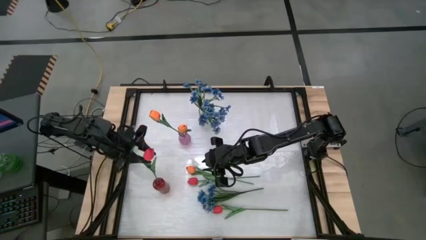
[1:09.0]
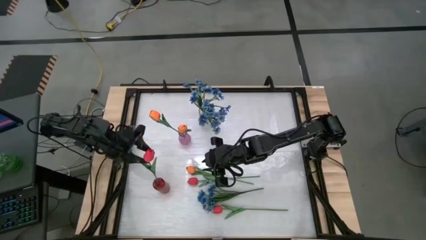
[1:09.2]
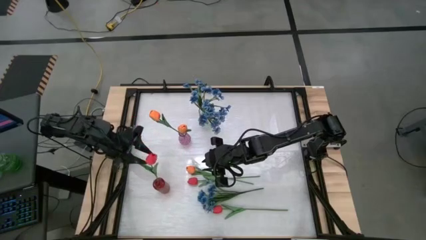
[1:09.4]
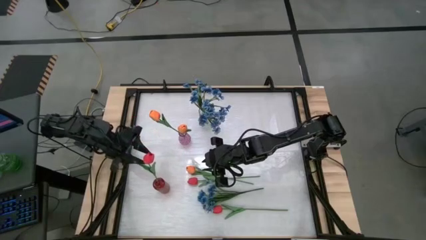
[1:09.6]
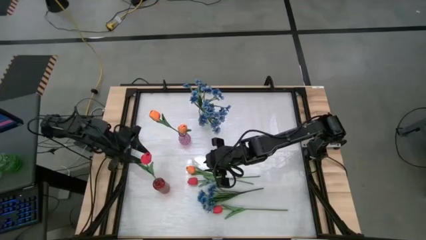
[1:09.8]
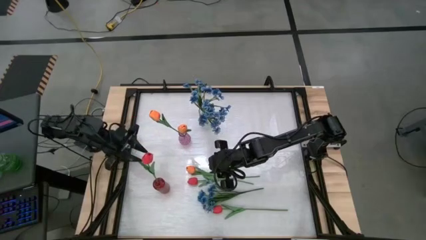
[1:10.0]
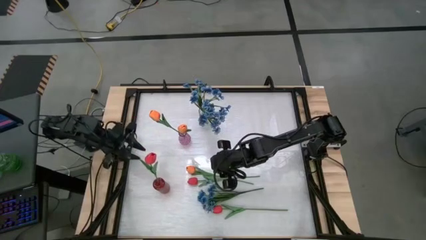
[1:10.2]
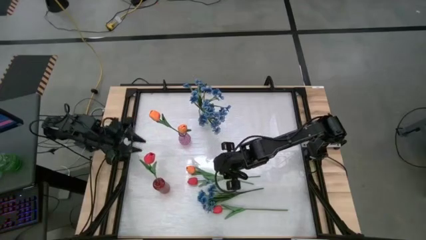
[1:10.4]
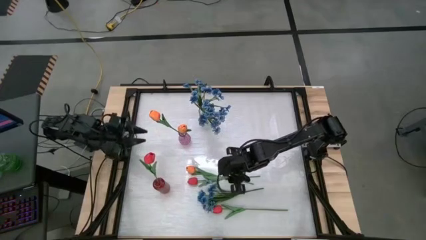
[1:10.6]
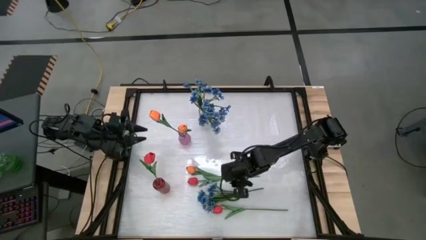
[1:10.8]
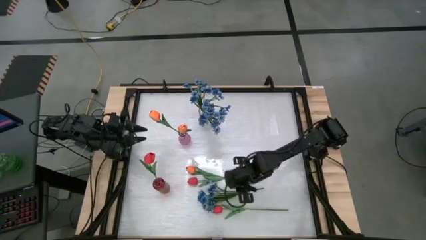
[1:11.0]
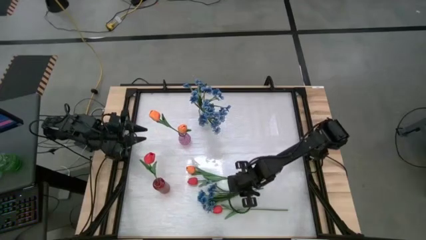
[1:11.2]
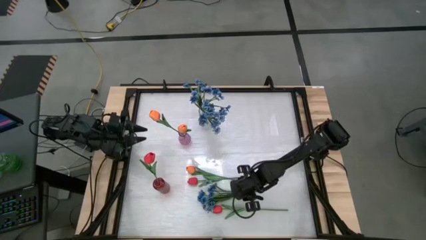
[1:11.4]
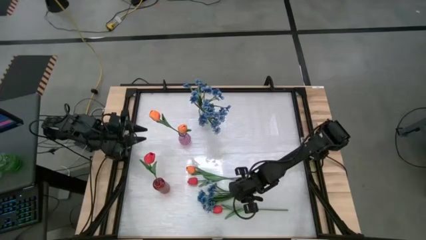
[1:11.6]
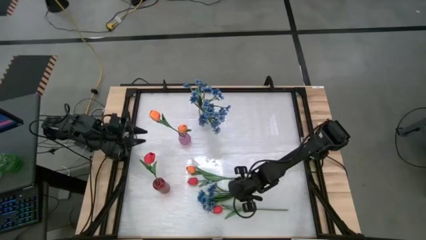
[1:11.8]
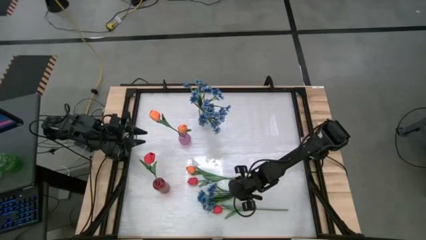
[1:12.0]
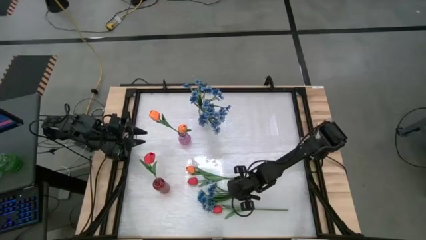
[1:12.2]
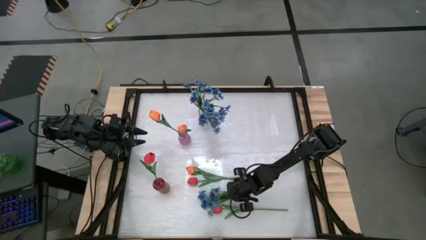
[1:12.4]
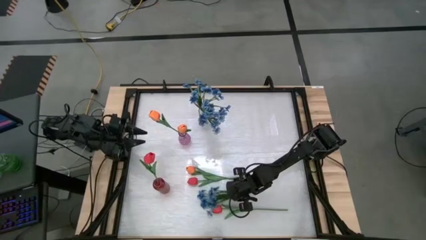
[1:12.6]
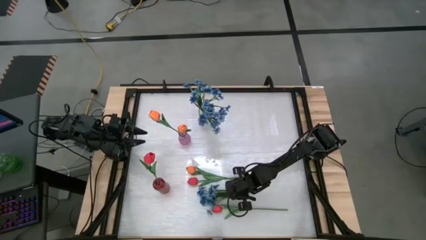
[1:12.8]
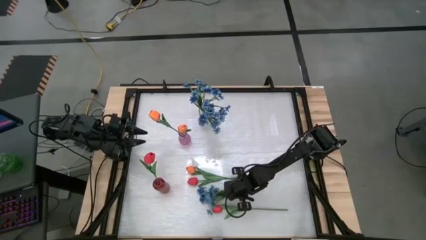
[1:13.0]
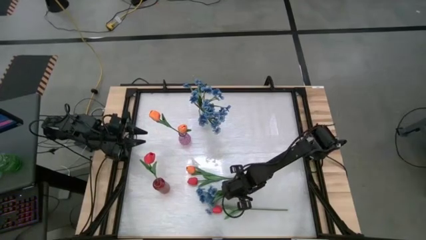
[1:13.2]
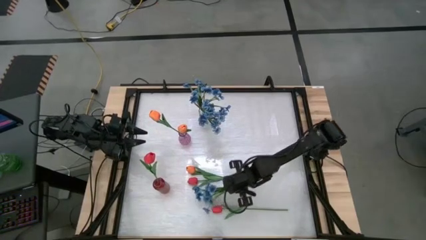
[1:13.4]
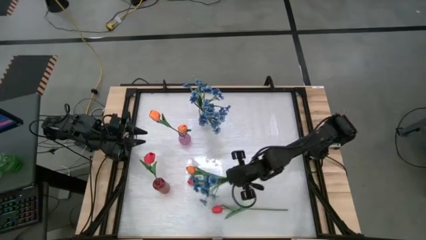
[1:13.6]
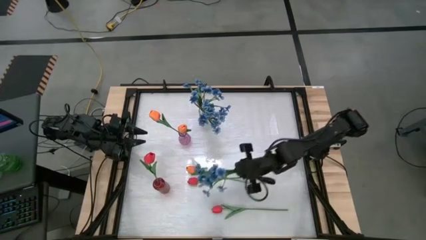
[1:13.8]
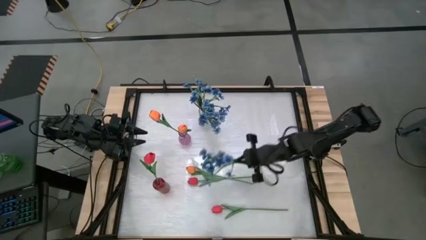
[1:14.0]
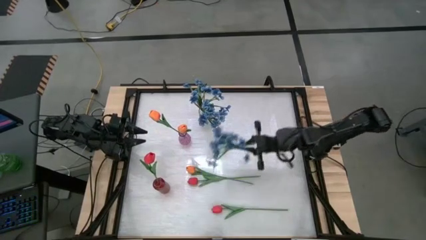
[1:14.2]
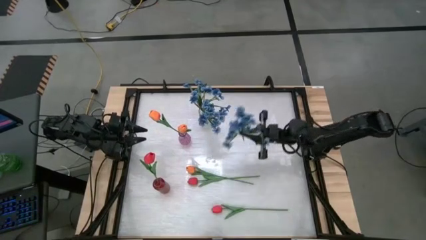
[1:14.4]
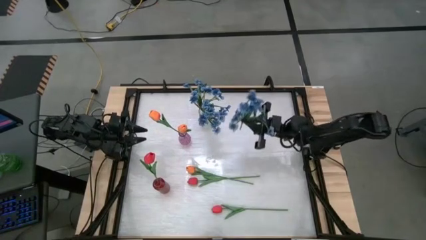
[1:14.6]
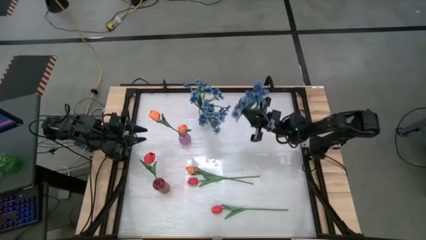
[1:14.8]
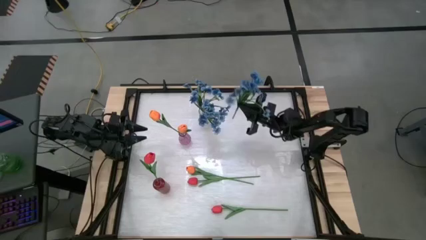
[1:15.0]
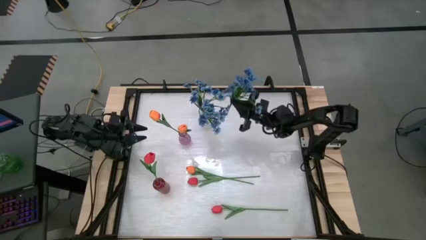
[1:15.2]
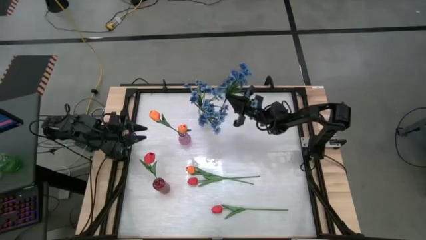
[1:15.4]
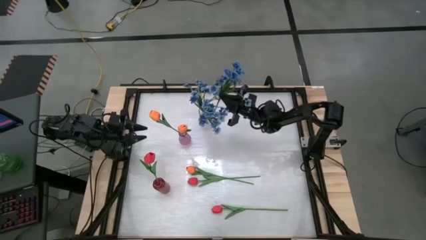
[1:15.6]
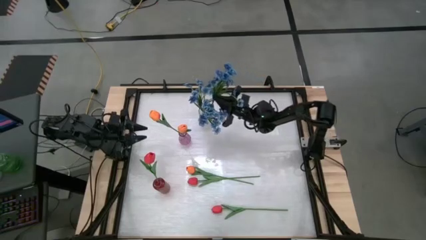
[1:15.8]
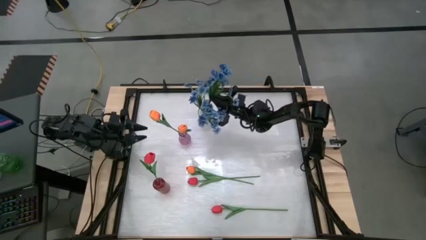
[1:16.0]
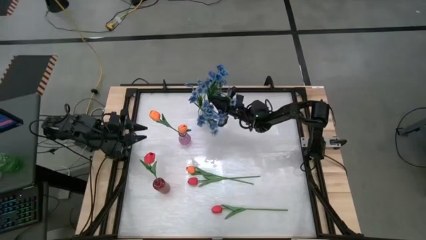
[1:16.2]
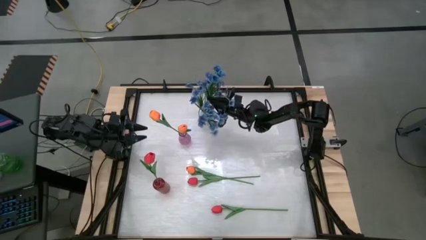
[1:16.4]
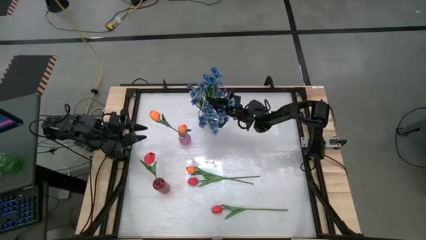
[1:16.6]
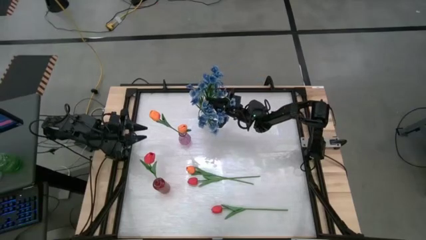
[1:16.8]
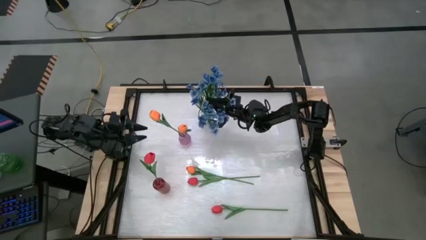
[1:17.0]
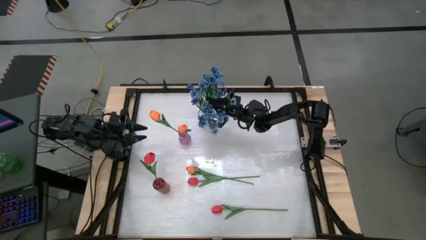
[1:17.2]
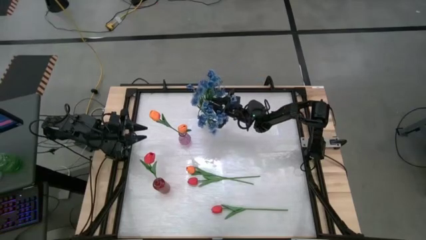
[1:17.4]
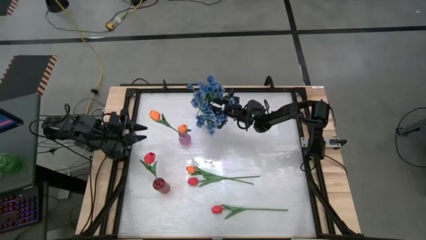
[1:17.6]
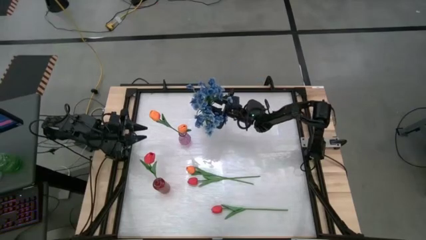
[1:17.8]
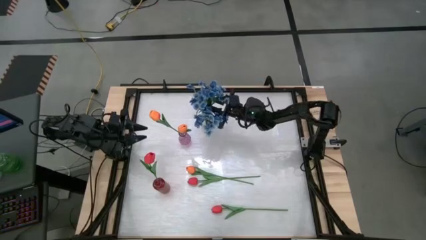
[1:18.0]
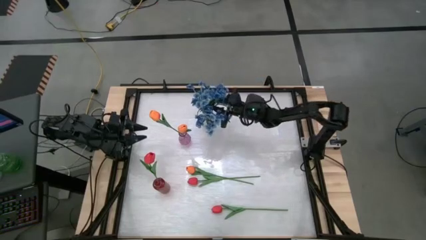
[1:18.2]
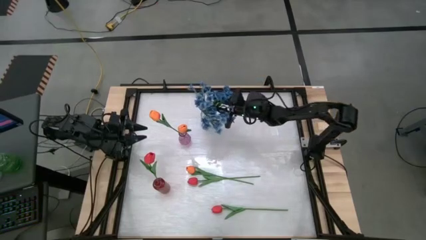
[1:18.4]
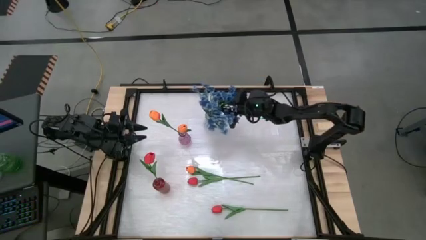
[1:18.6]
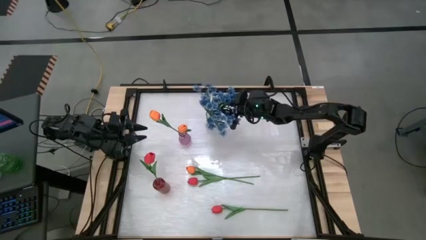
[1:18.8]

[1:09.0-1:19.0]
Task: Sort flowers into vase by color
Put the blue flowers into the transparent vase
